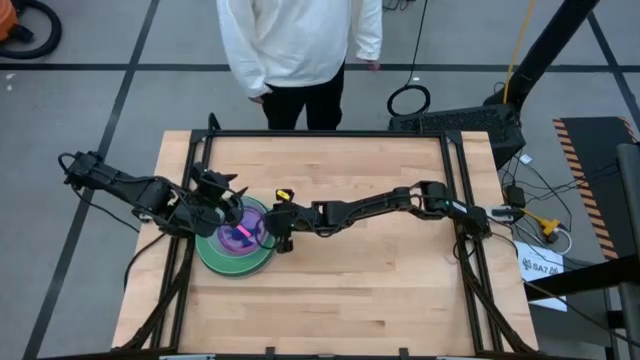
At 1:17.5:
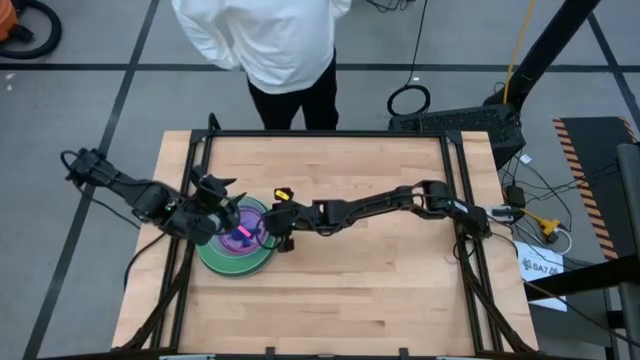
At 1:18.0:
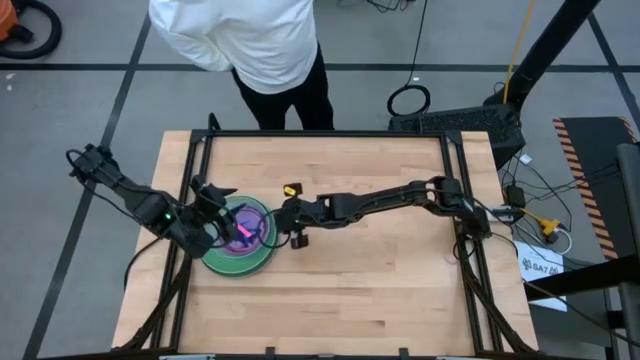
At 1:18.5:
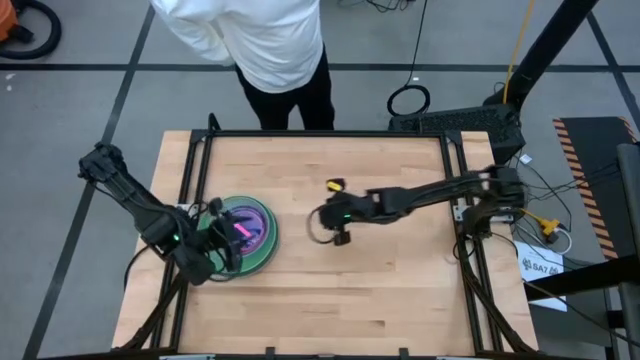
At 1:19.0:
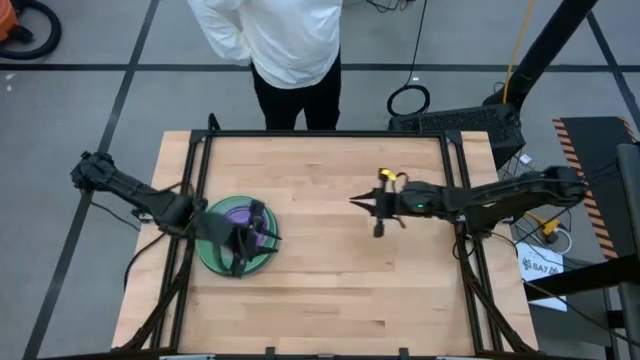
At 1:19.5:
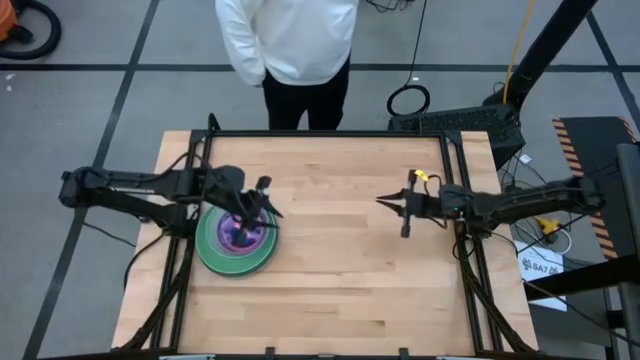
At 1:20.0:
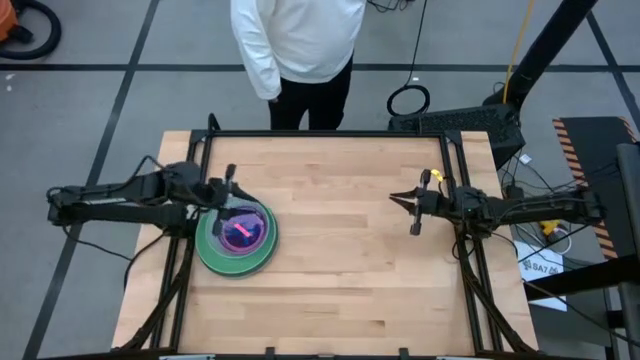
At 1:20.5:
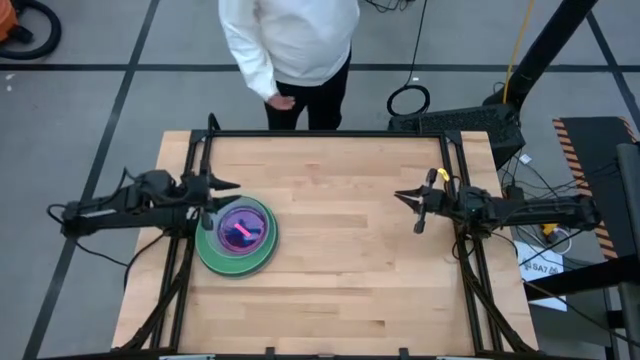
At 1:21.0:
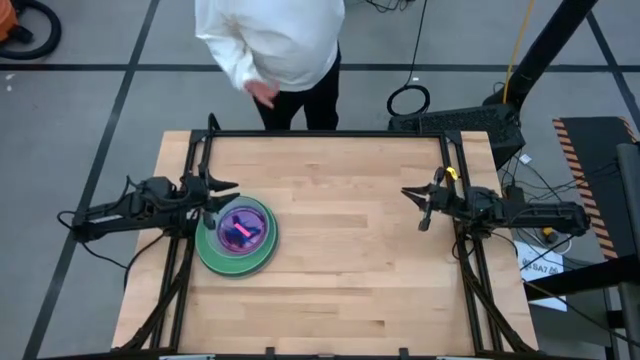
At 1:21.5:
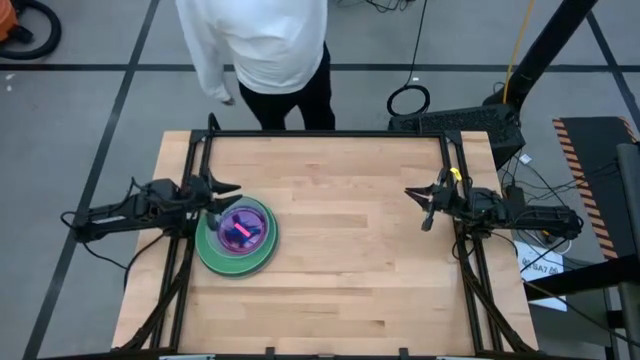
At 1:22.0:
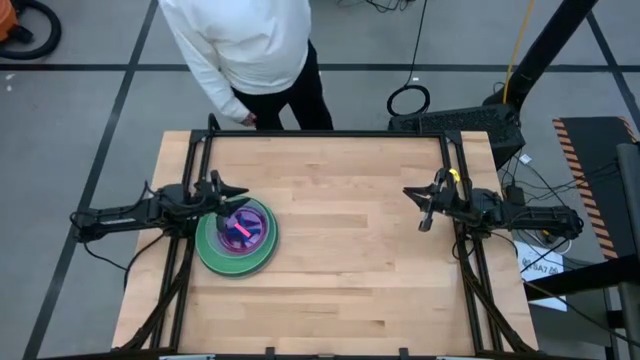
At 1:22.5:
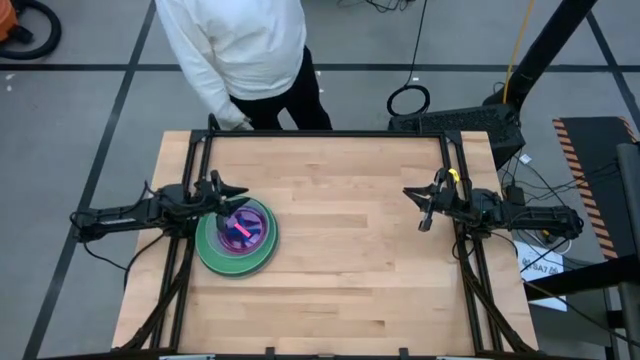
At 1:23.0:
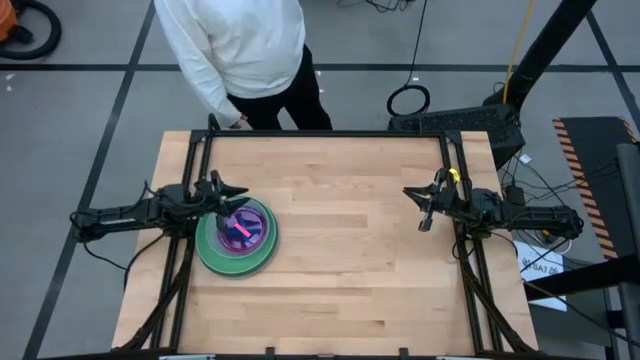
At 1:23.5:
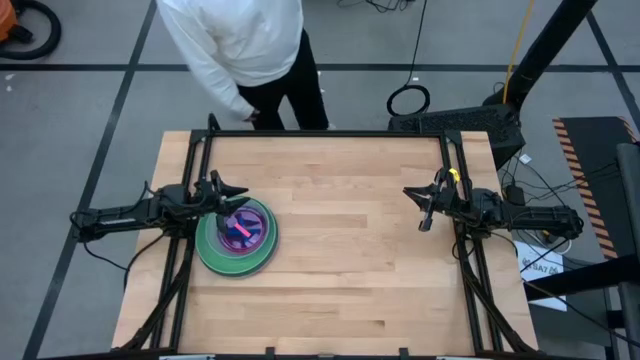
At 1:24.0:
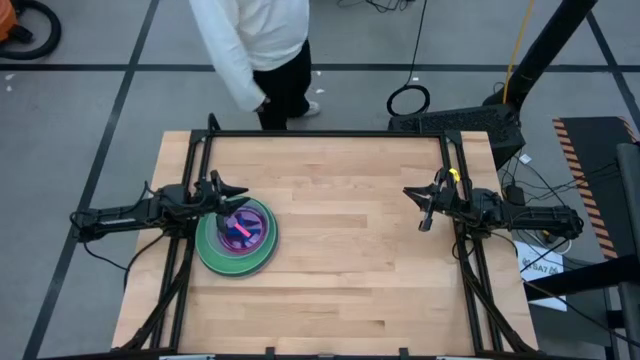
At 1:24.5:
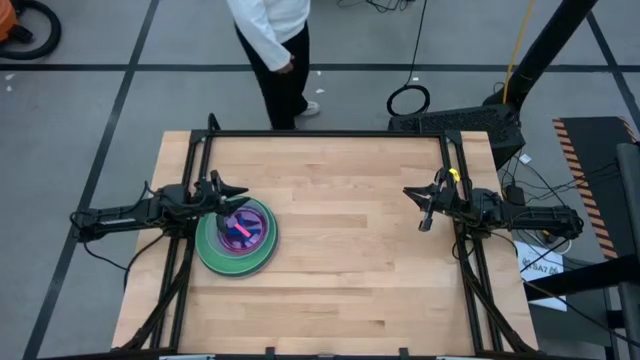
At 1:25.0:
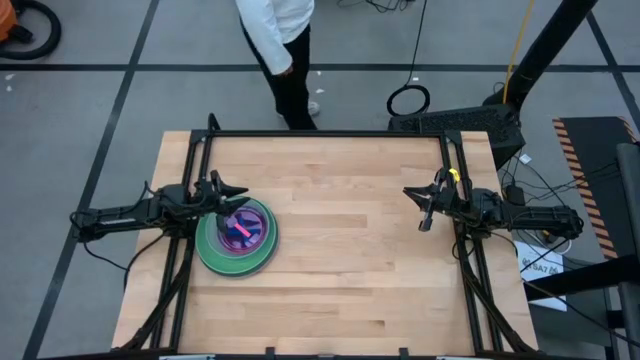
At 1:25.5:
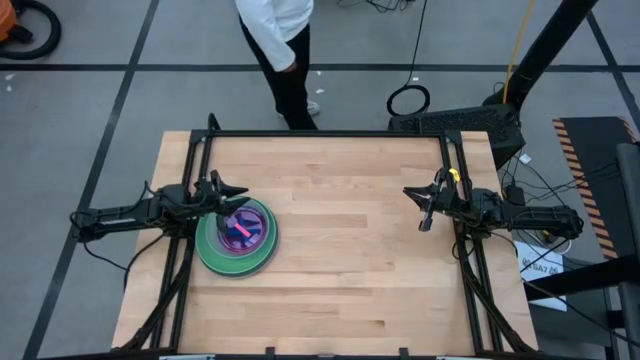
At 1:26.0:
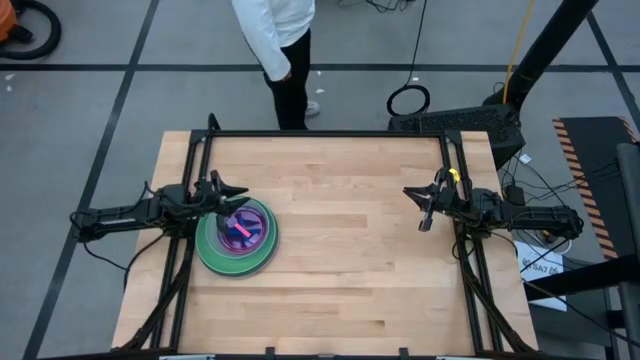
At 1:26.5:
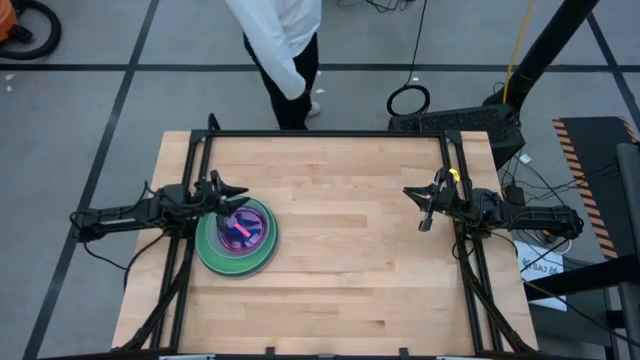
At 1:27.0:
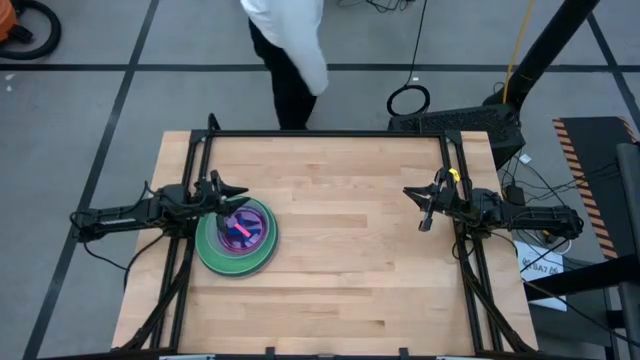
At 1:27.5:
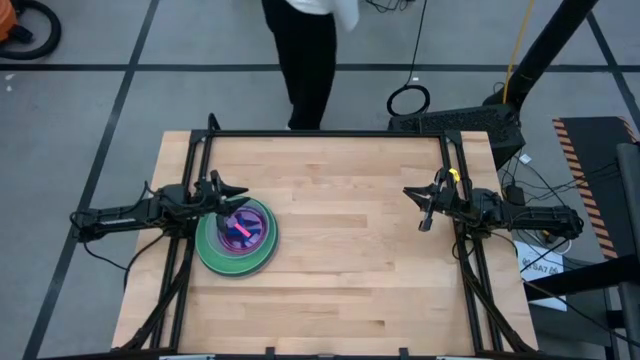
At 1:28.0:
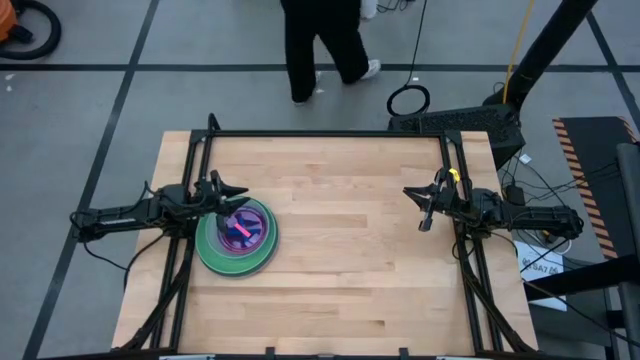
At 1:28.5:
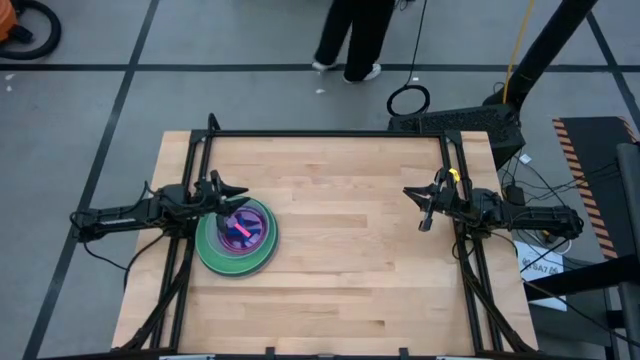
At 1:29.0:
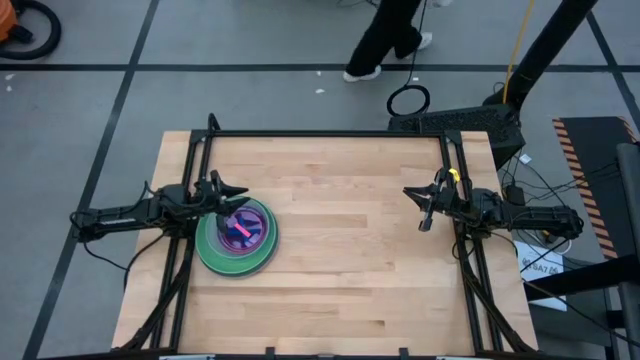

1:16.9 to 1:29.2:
Task: Stack plastic plates
Return to Home Position

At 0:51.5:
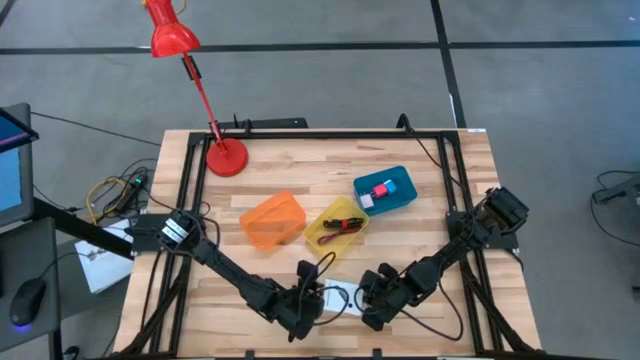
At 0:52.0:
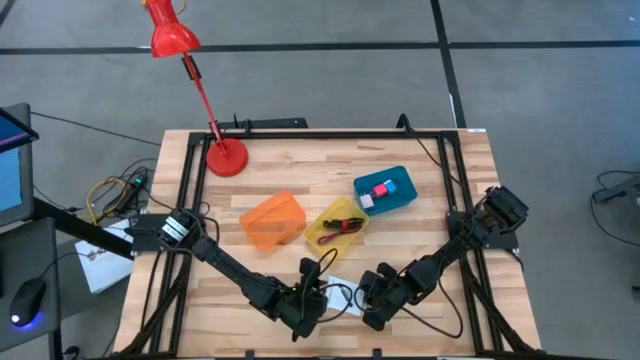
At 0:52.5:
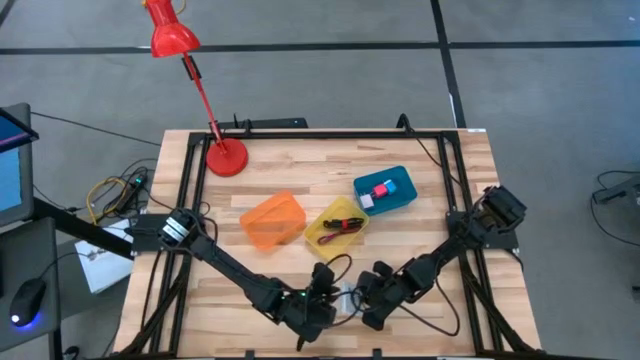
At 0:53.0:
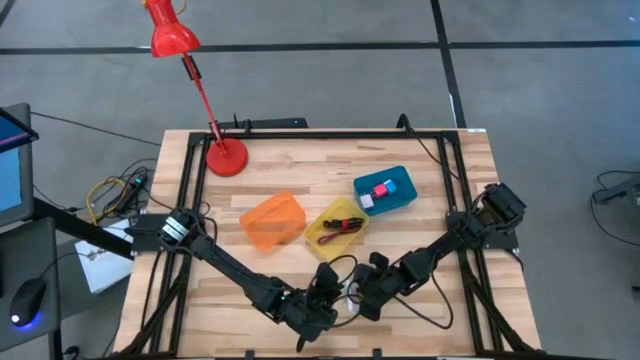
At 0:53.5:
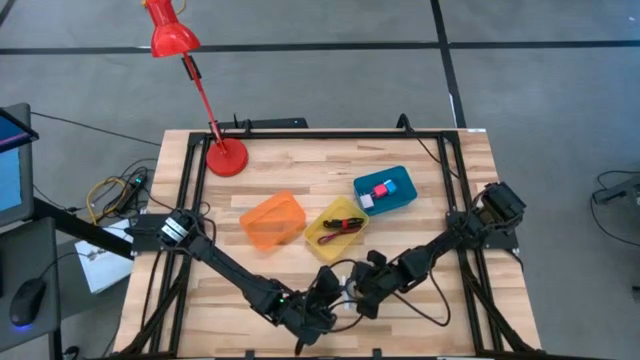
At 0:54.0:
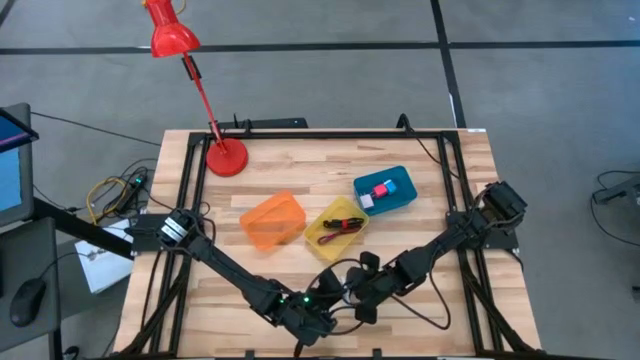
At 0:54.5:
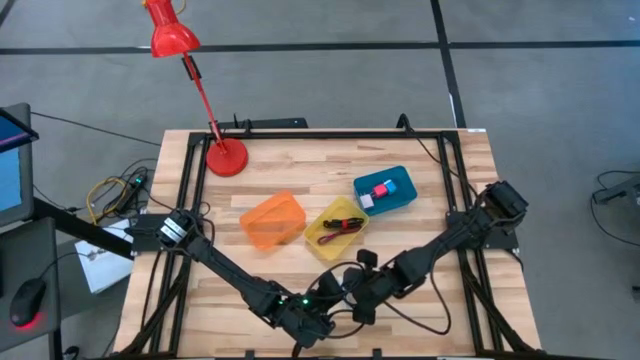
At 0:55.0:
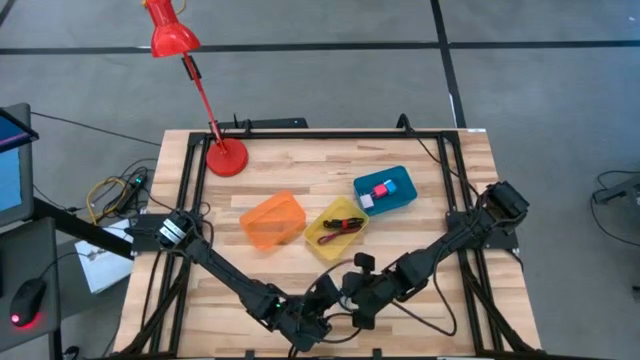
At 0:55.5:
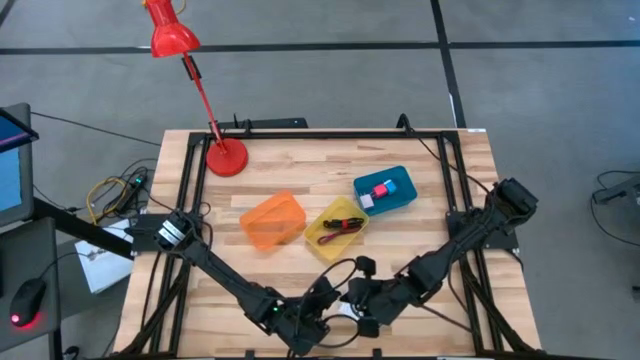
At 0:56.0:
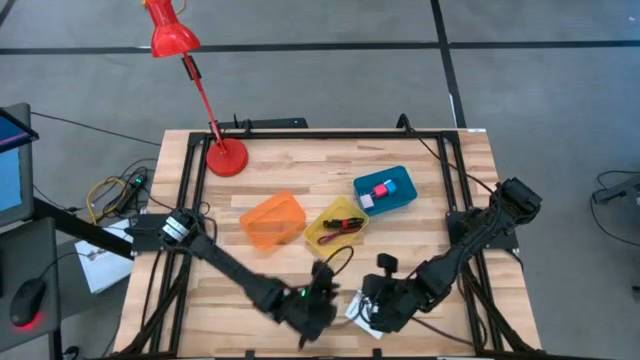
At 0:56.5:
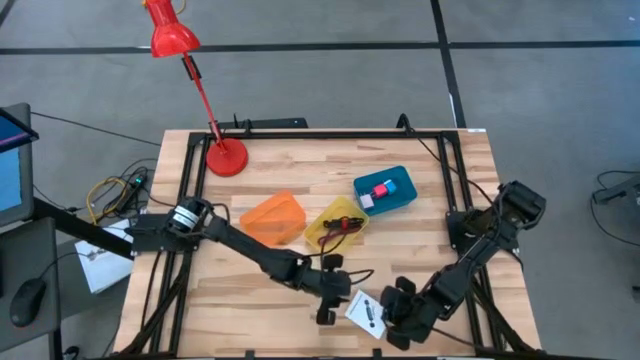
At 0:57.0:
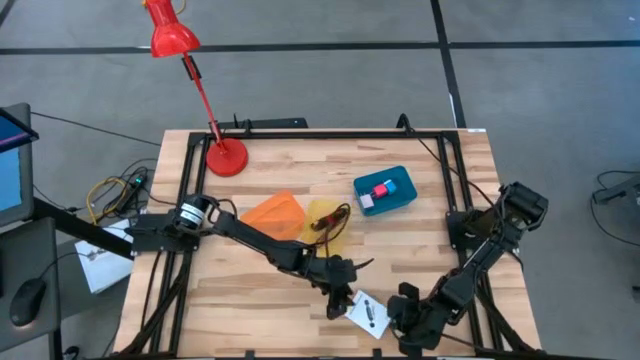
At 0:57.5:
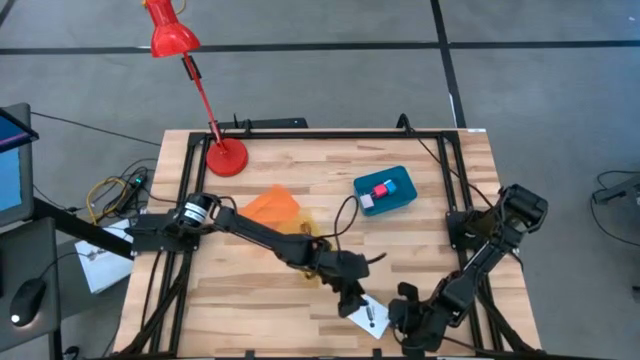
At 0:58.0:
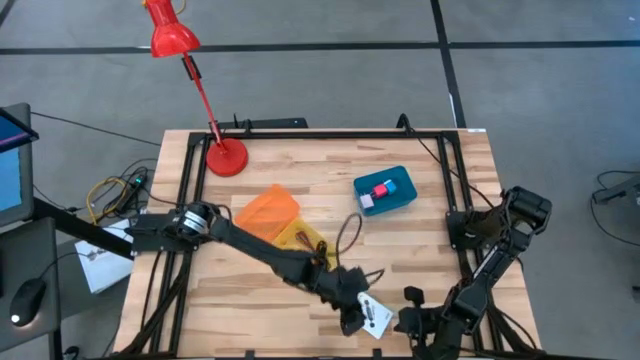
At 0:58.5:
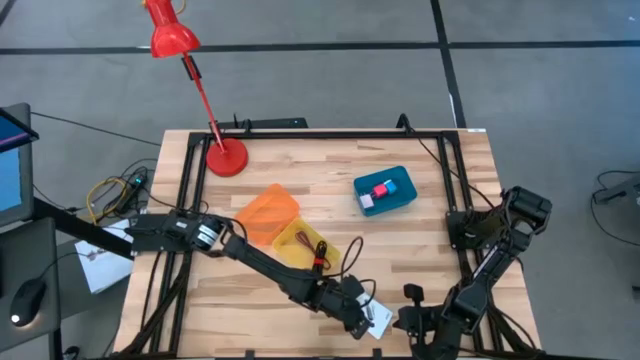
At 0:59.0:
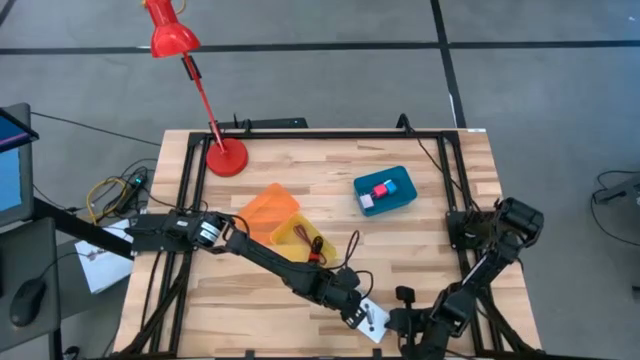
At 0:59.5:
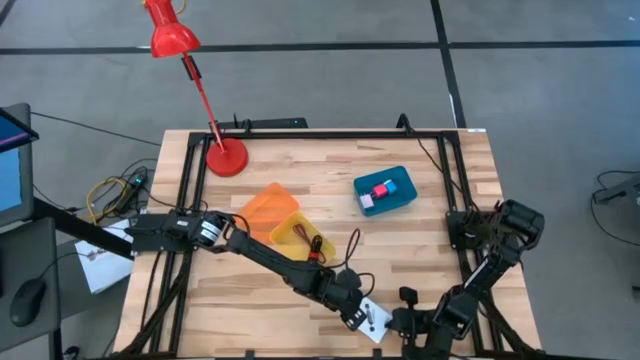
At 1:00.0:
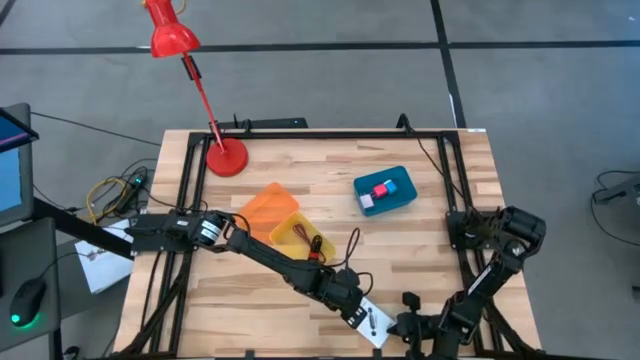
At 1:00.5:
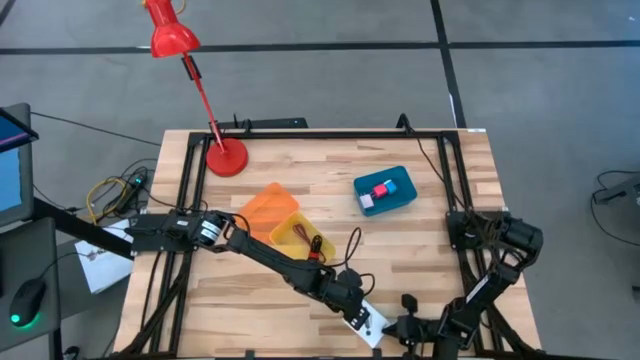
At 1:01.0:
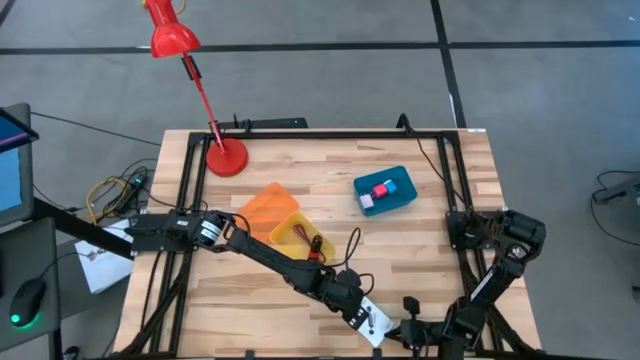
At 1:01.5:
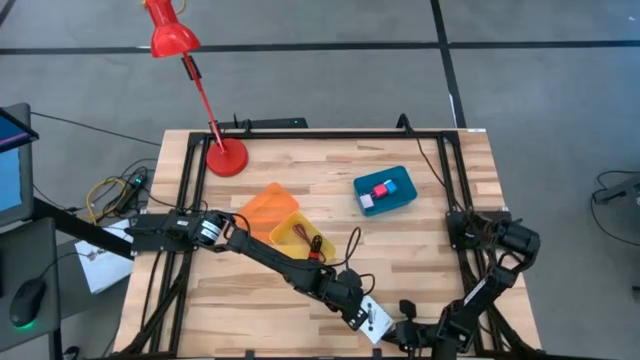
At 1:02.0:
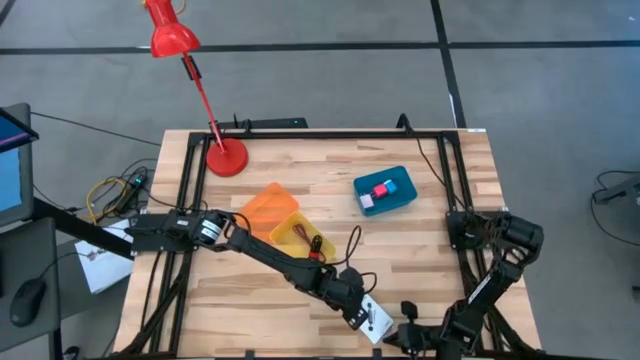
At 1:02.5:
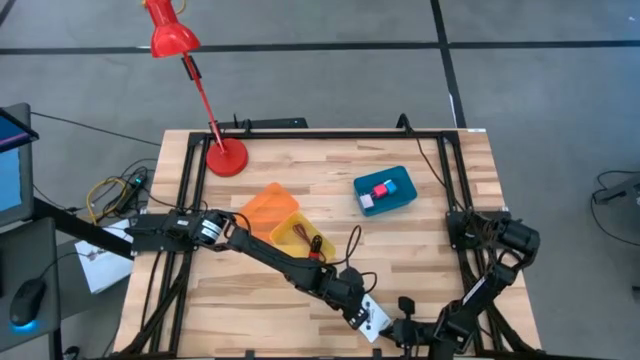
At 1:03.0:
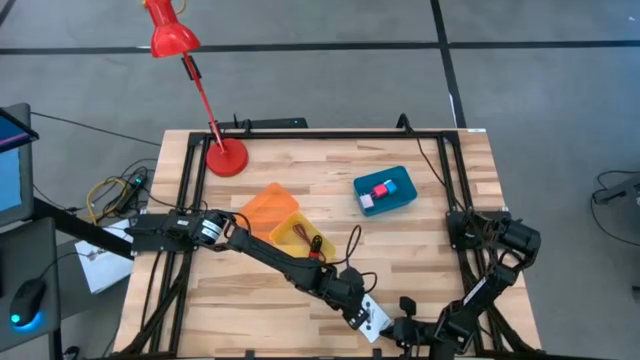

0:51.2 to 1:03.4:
Task: Pick and place items into bin
Put the card reader box into the orange bin
